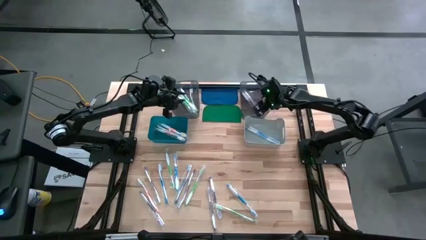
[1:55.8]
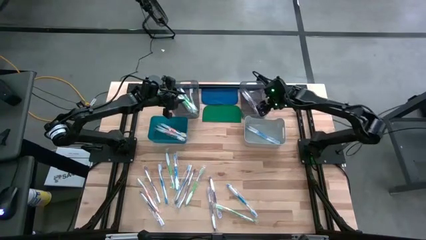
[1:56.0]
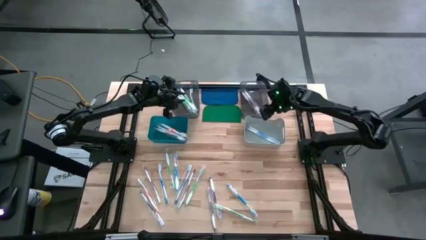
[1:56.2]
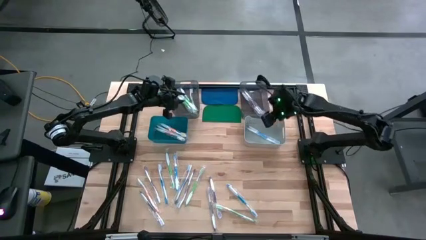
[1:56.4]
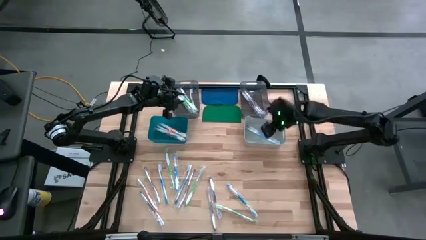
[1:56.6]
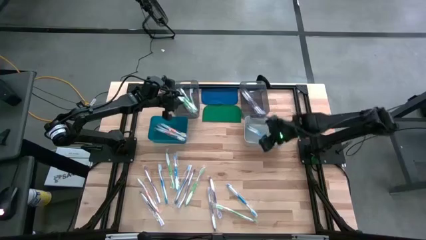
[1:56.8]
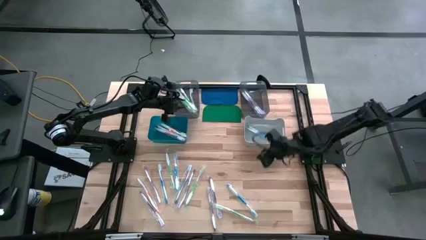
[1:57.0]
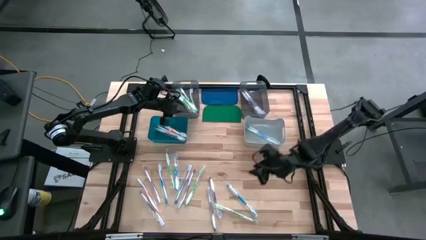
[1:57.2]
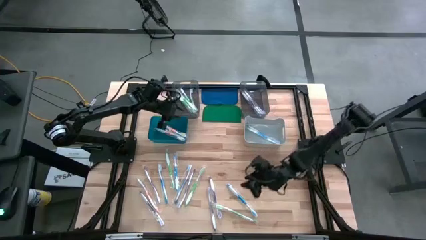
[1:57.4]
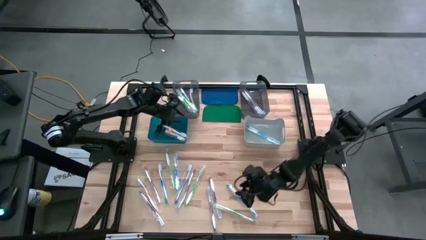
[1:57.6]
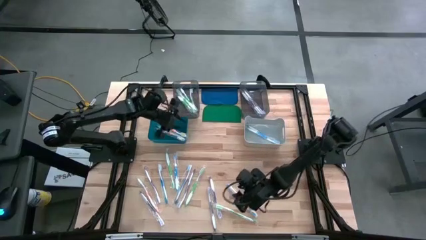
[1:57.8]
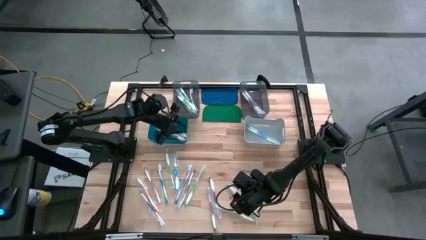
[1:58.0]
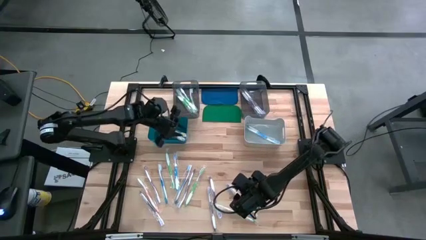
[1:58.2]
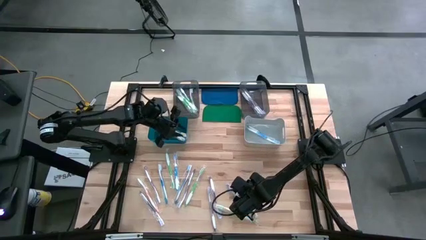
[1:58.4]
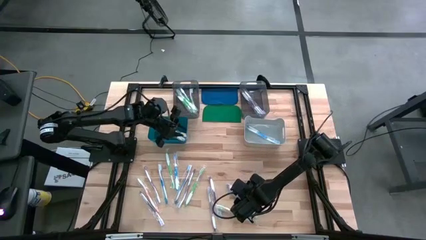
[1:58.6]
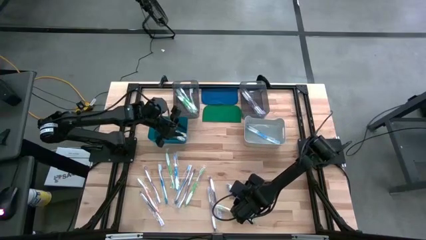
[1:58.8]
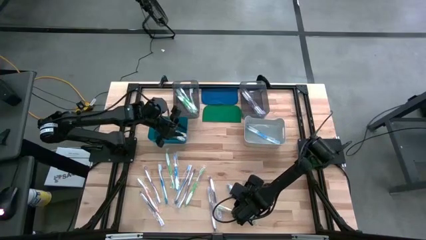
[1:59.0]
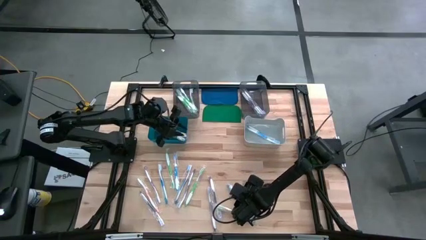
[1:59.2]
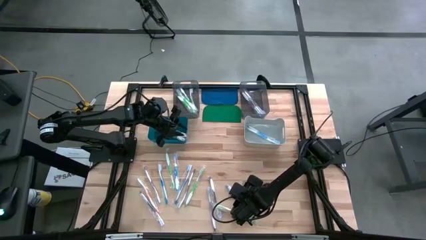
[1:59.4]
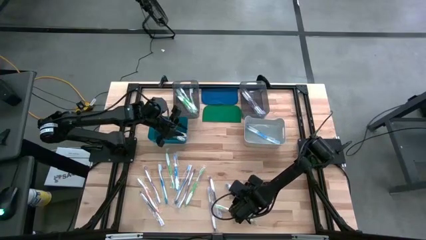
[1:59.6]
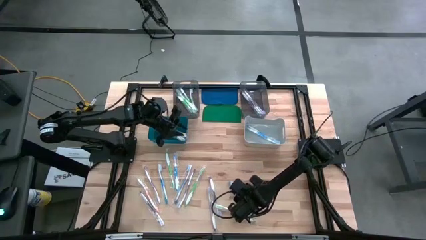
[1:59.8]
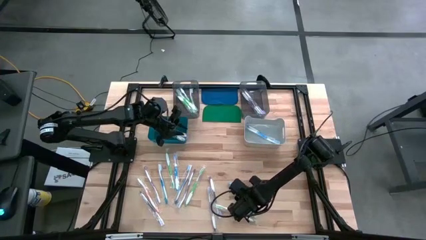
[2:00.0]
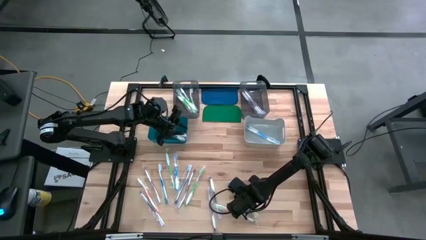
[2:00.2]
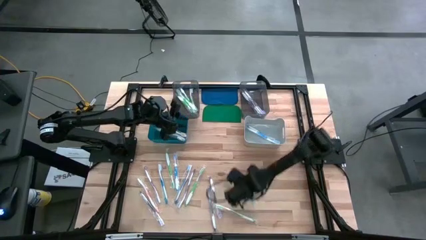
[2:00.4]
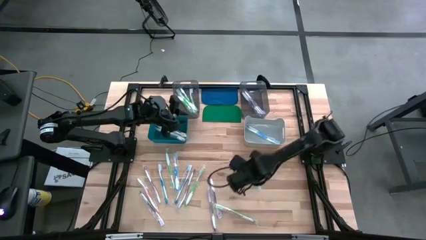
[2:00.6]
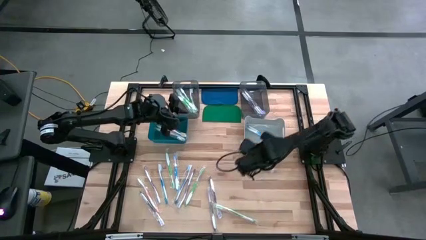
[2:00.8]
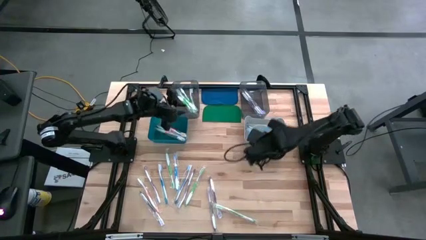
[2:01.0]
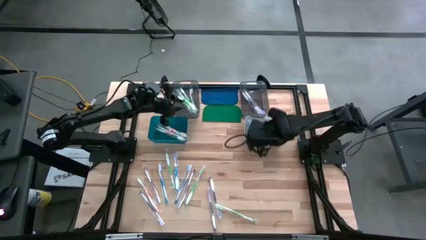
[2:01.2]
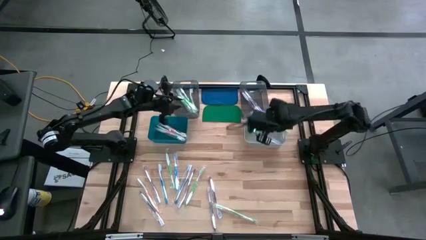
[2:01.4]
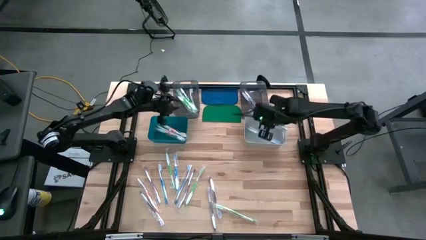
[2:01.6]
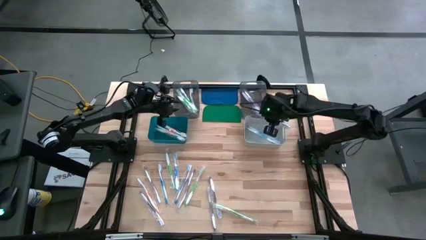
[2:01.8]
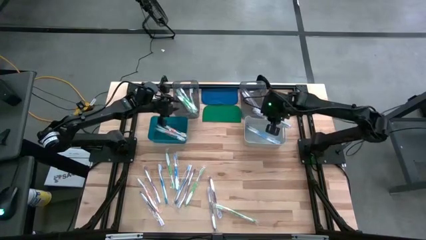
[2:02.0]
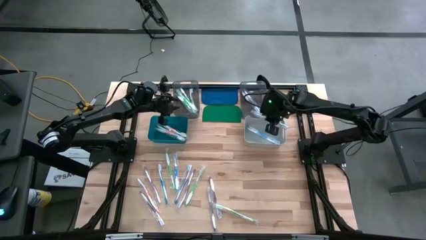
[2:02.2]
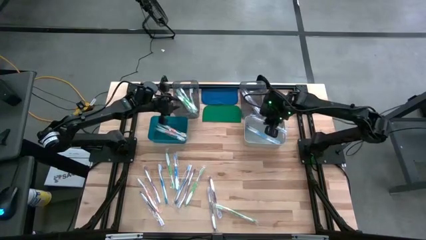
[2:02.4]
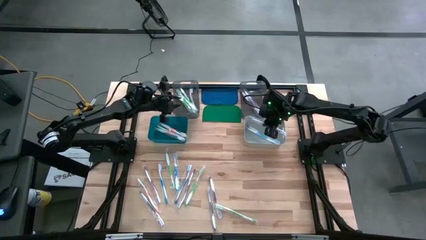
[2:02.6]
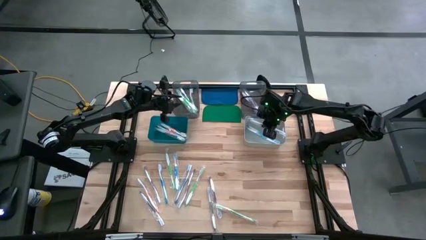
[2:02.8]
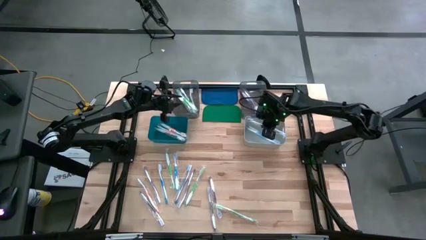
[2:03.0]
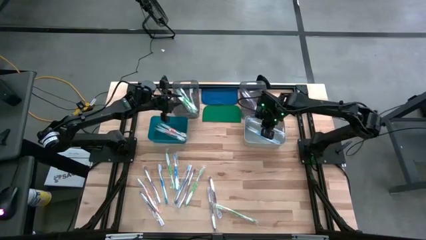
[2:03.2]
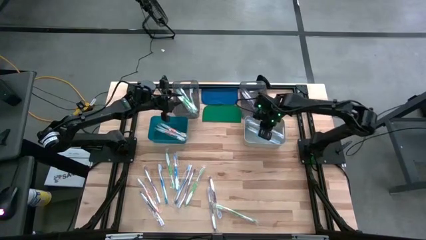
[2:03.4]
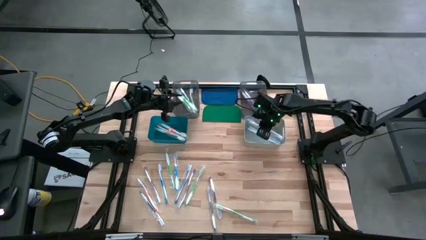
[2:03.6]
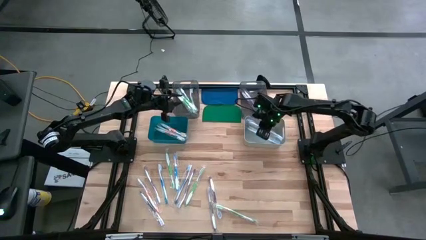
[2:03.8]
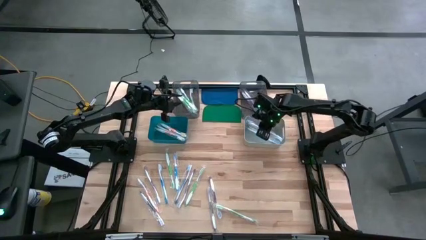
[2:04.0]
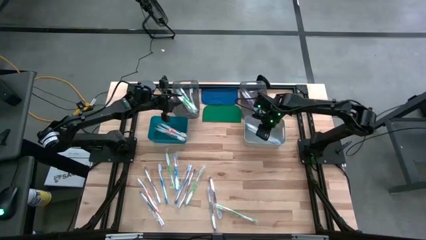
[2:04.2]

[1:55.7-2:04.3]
Task: Pick & Place Toothbrushes
Put the blue toothbrush into the grey bin

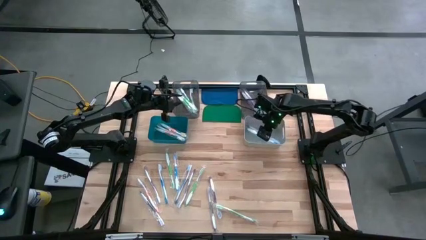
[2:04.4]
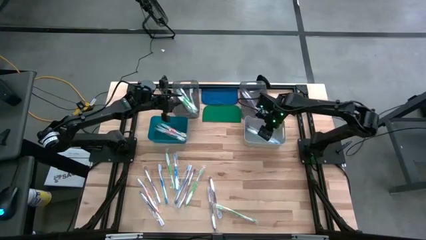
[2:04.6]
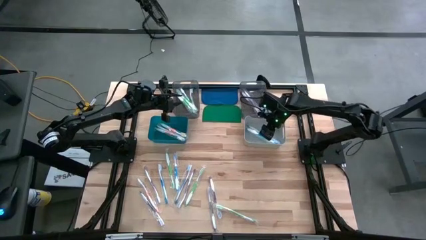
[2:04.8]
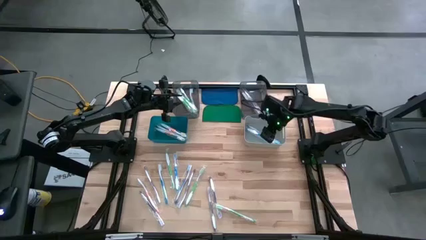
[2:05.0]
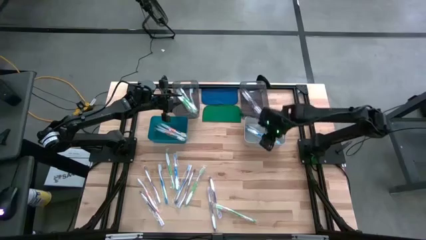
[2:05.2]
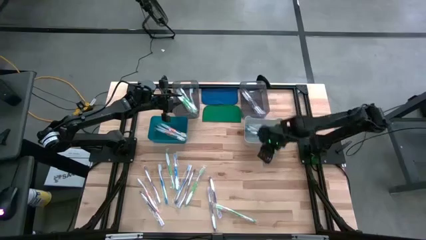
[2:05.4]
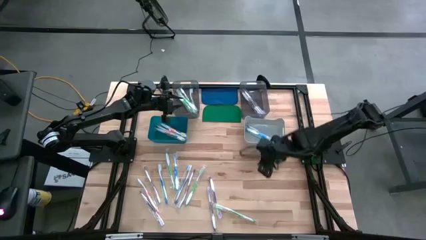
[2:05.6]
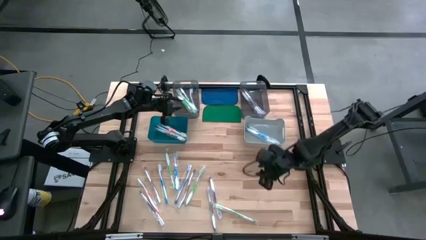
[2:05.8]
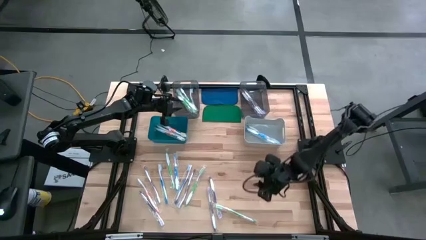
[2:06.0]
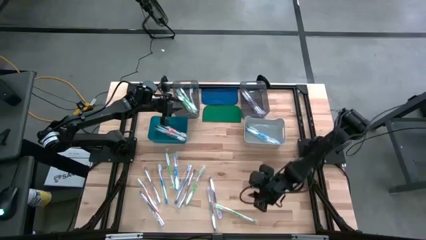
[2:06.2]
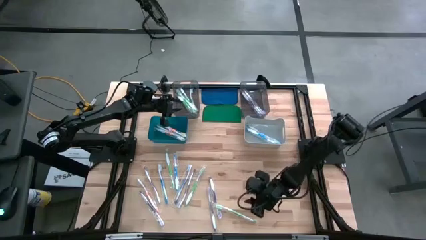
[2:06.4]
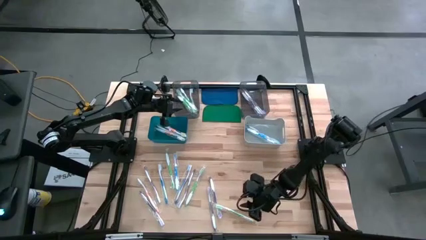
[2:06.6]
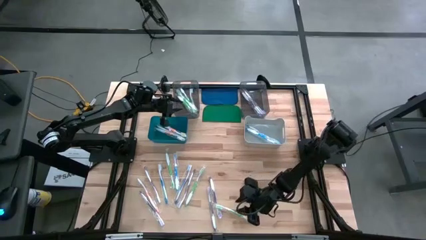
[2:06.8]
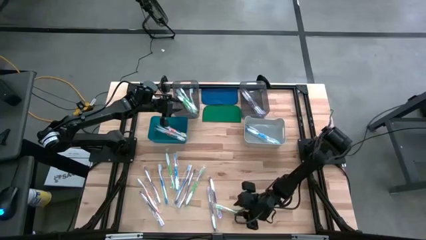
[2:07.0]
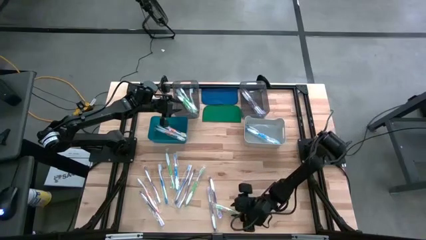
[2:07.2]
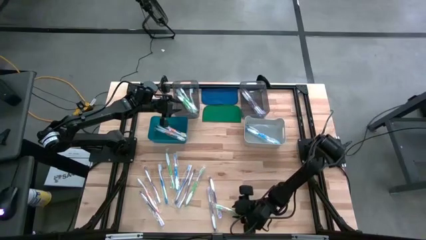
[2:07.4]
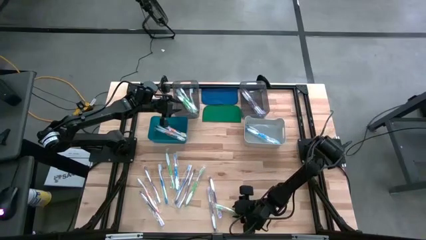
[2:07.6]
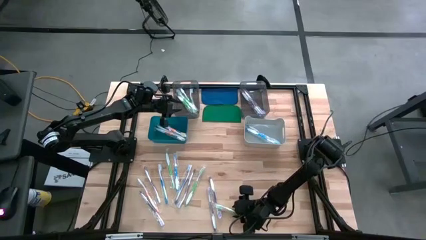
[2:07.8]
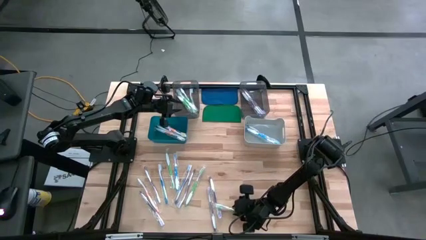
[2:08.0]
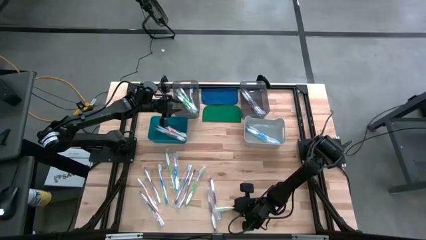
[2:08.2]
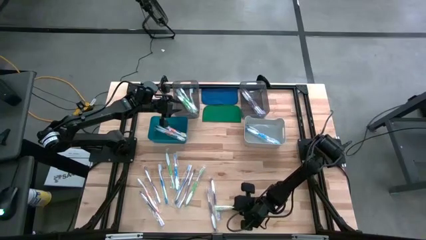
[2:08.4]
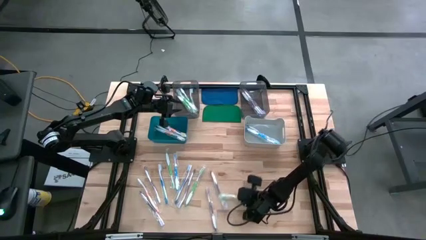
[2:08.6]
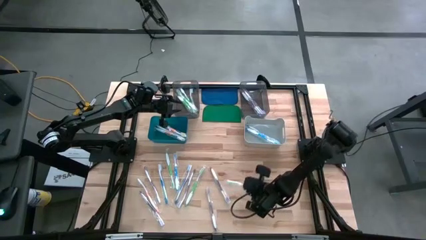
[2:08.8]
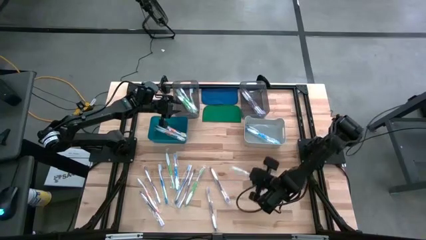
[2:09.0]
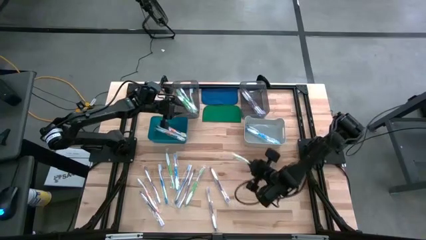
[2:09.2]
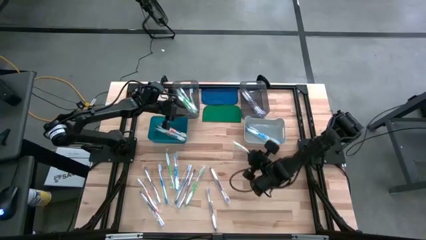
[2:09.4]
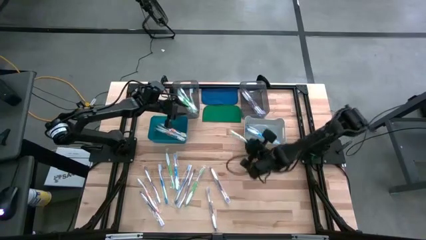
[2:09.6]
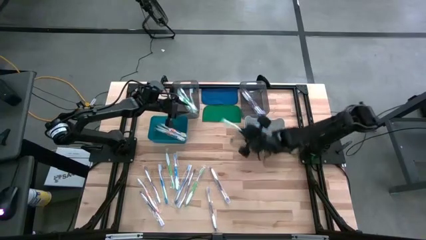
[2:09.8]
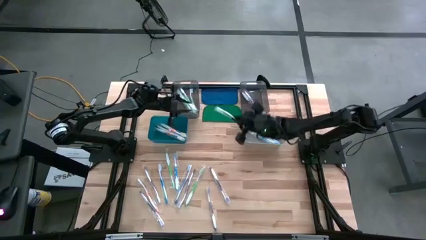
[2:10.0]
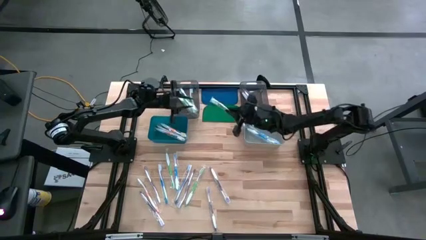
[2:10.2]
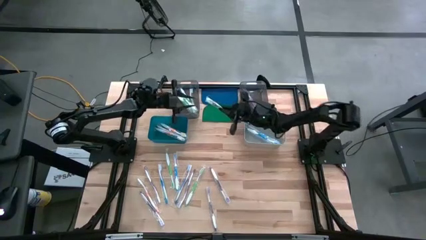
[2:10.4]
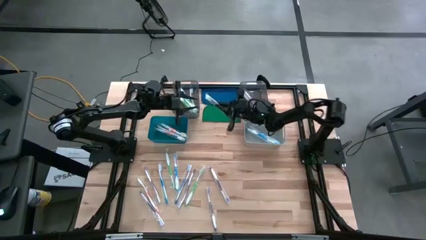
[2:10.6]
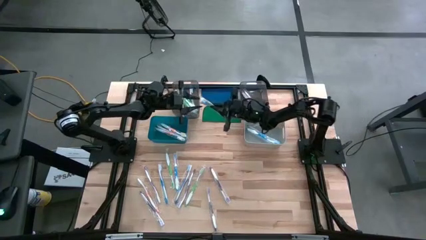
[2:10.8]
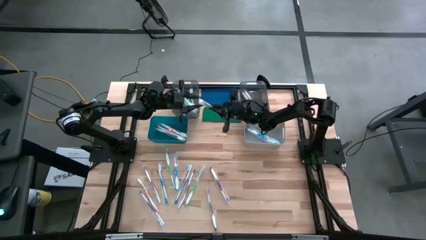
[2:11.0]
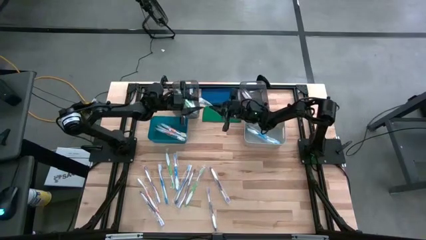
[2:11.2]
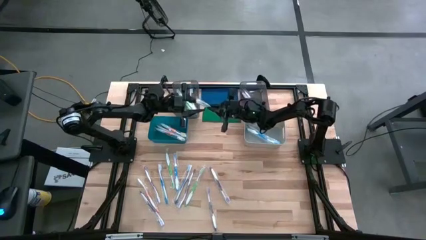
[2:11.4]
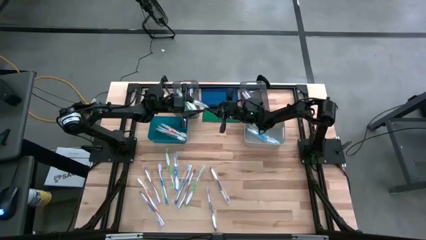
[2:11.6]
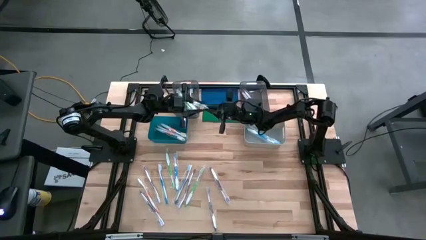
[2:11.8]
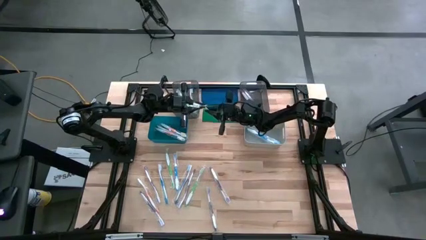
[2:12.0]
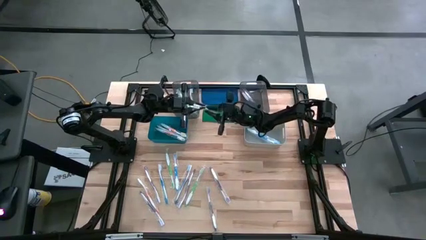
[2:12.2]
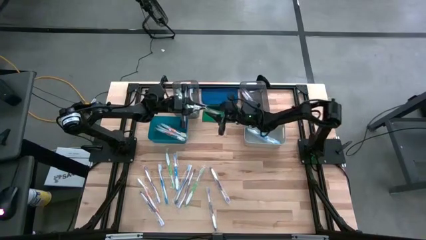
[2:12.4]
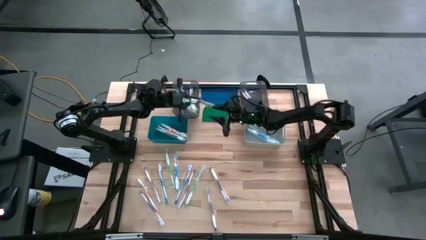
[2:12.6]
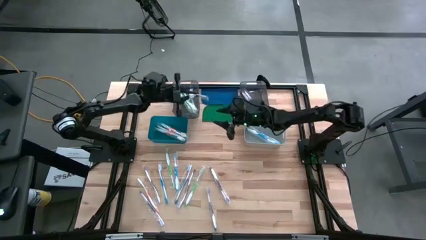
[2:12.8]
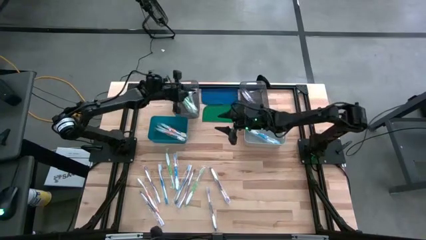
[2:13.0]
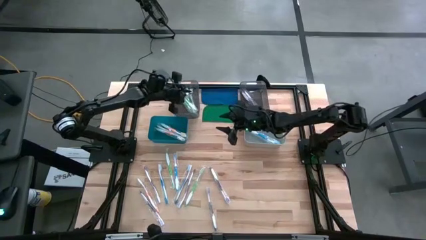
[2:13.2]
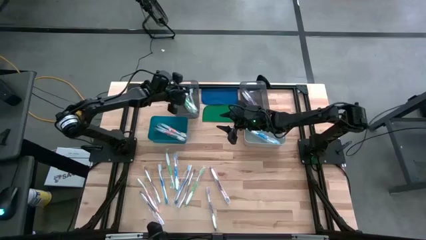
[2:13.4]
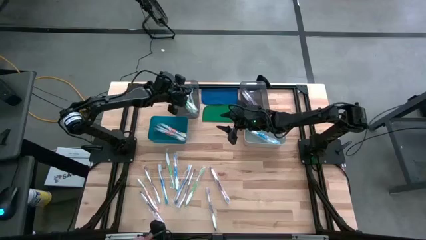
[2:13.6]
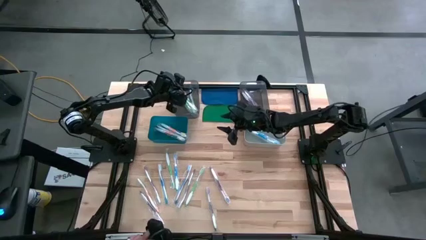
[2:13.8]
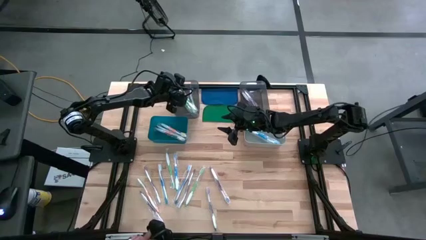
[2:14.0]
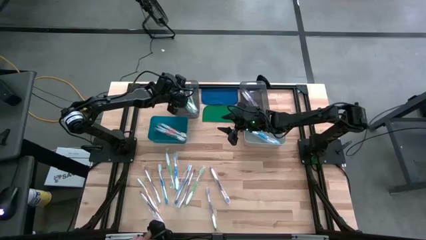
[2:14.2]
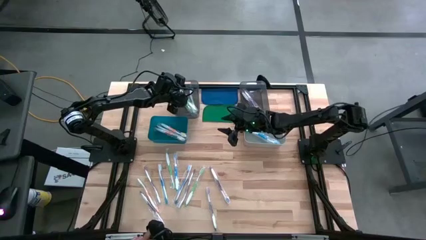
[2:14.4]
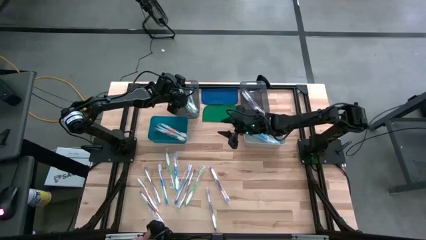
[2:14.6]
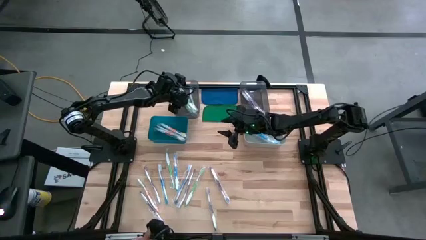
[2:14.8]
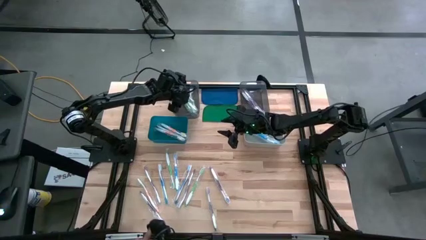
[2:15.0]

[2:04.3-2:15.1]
Put the green toothbrush into the left black bin
